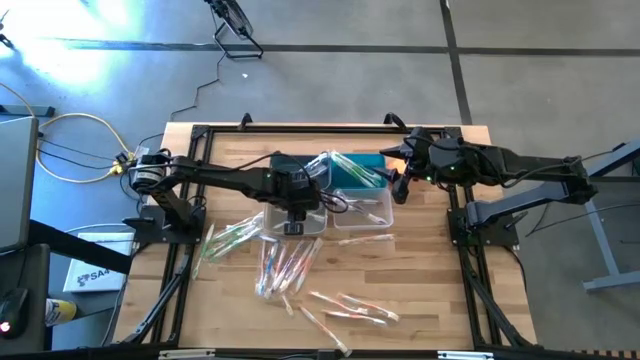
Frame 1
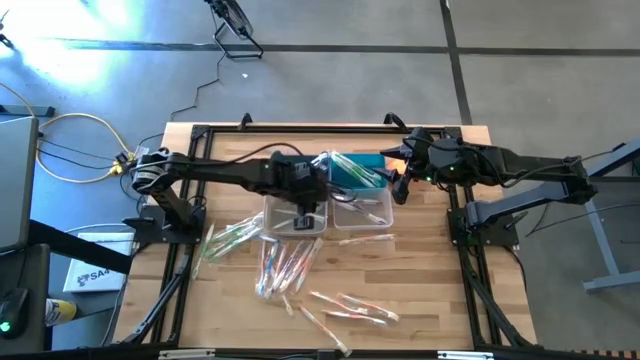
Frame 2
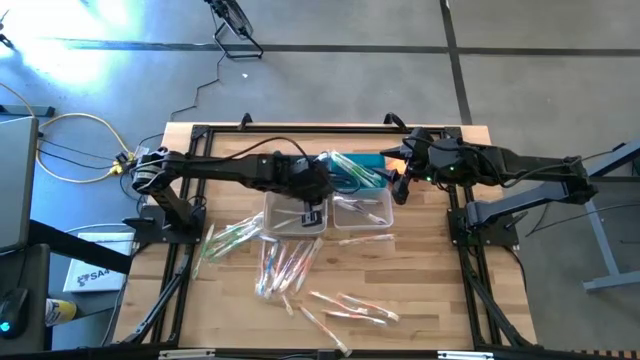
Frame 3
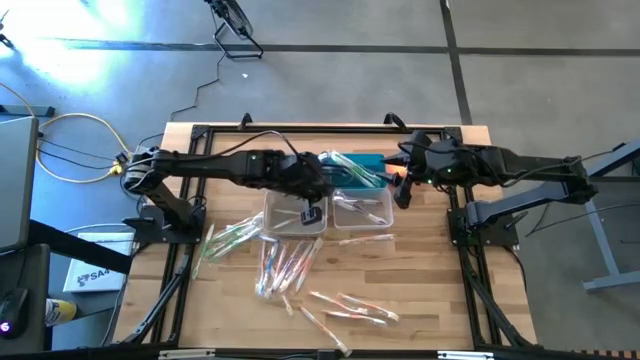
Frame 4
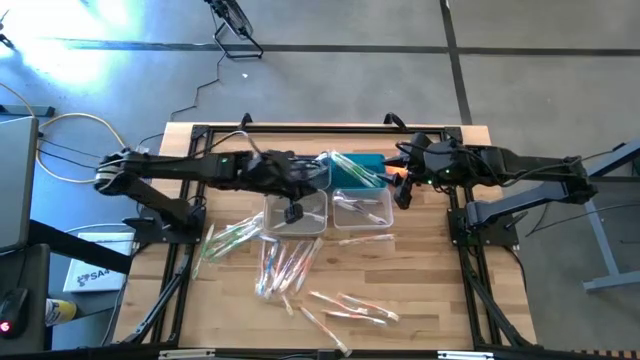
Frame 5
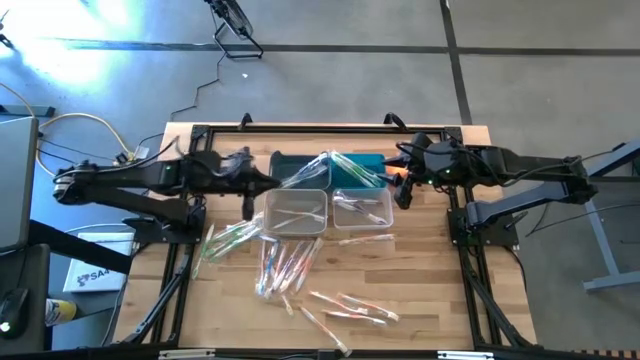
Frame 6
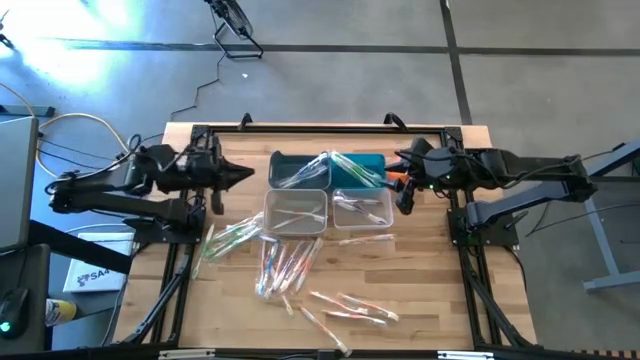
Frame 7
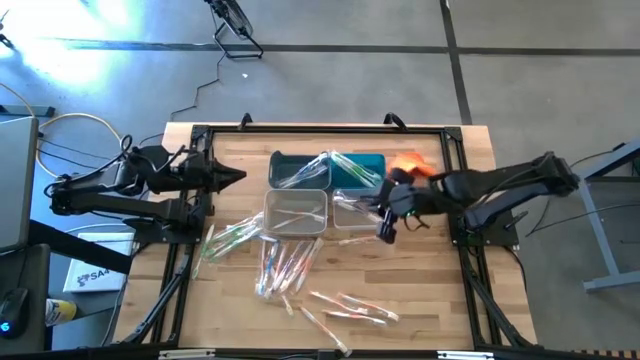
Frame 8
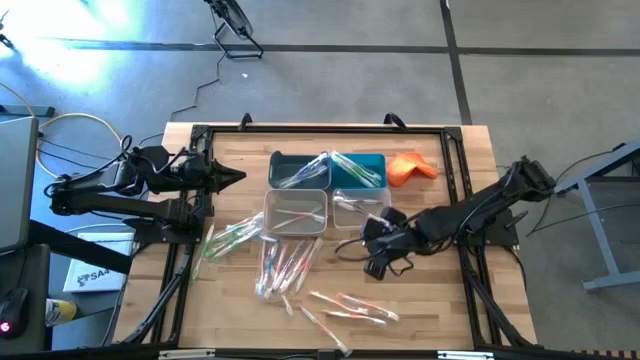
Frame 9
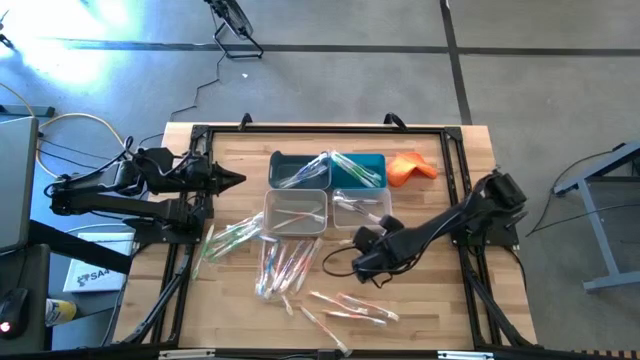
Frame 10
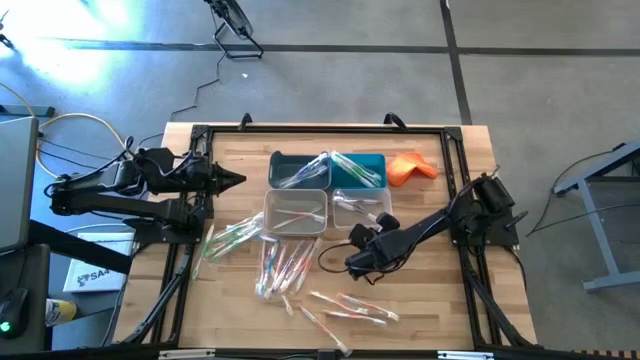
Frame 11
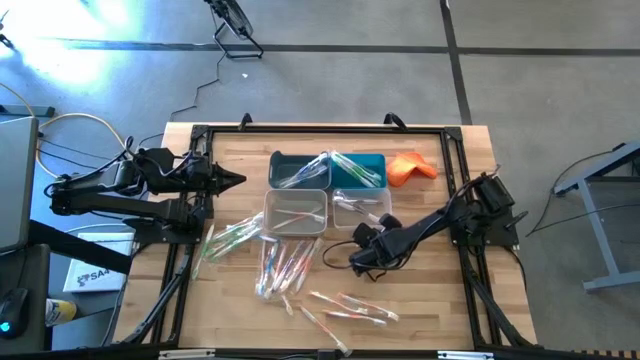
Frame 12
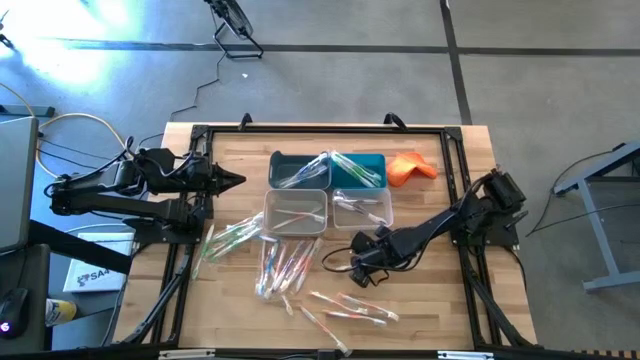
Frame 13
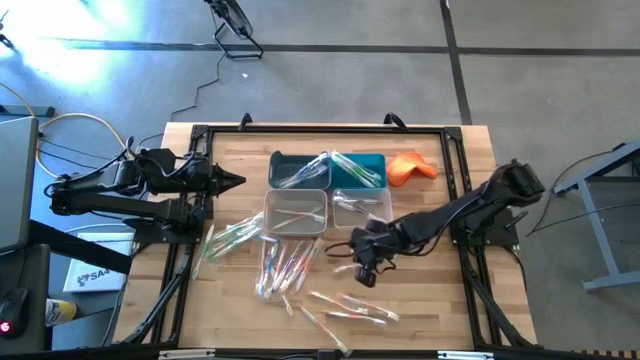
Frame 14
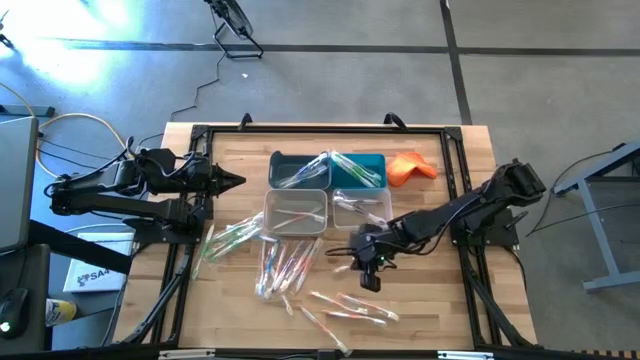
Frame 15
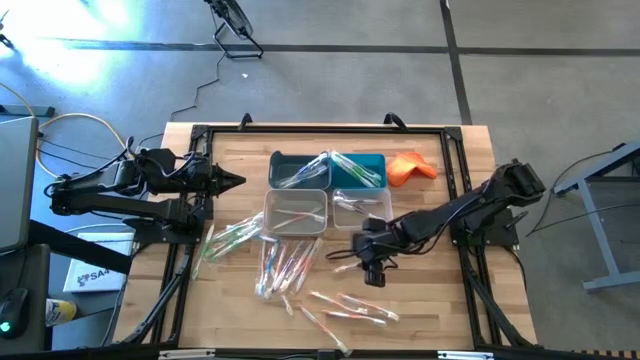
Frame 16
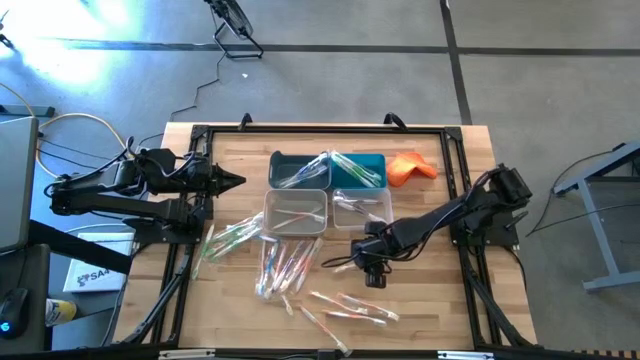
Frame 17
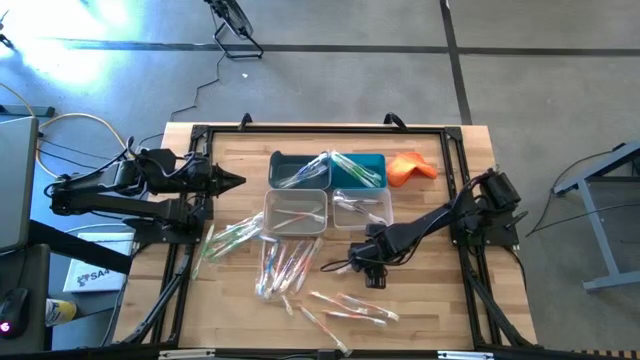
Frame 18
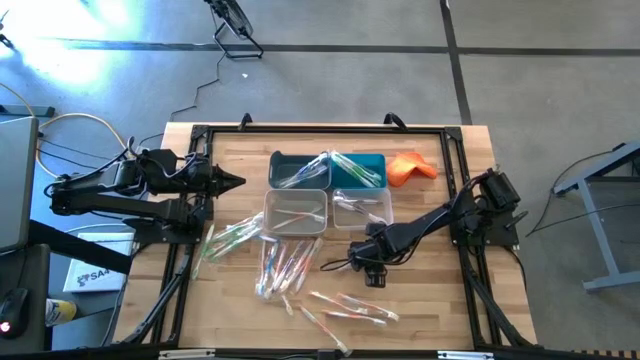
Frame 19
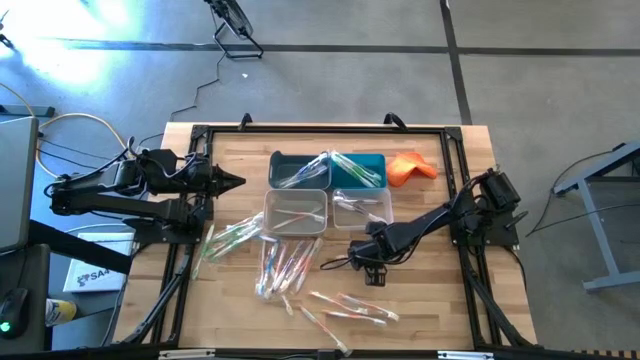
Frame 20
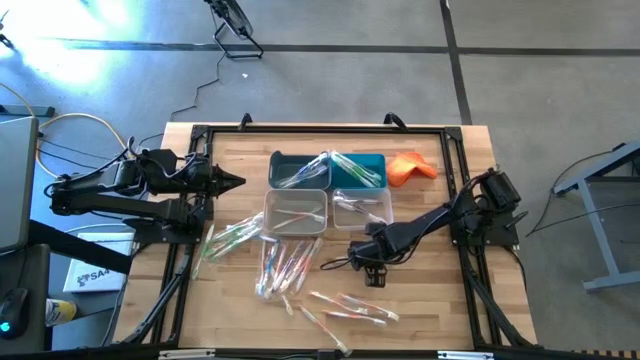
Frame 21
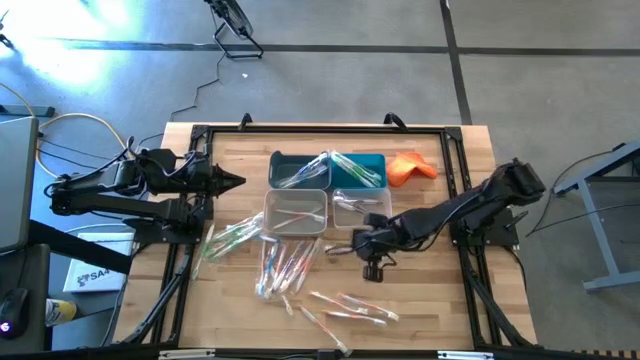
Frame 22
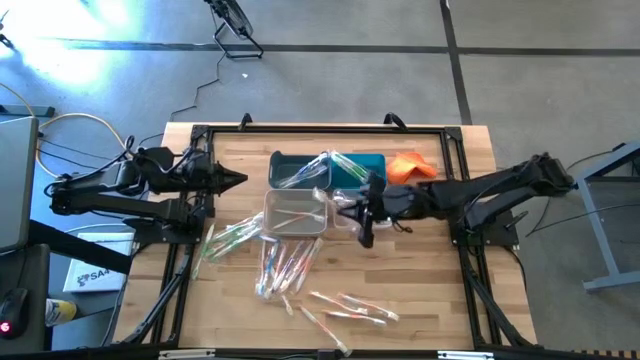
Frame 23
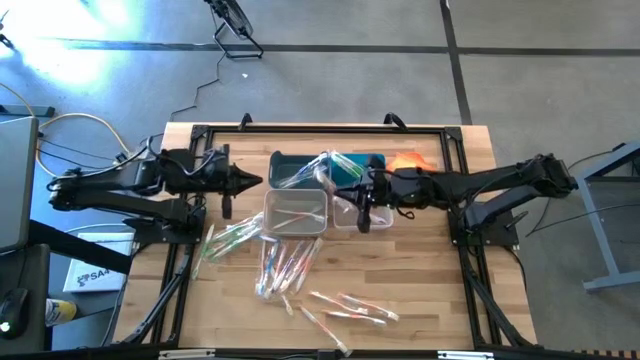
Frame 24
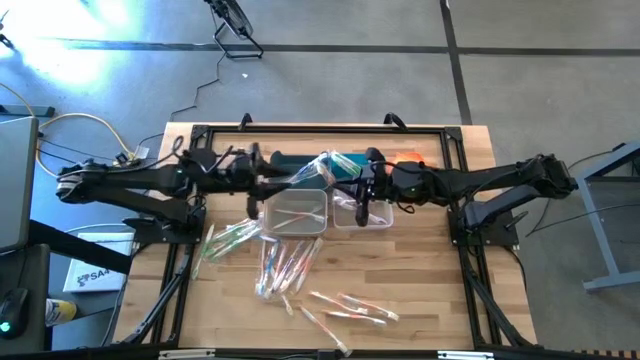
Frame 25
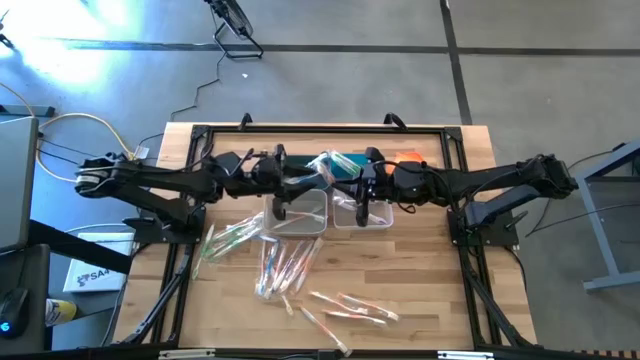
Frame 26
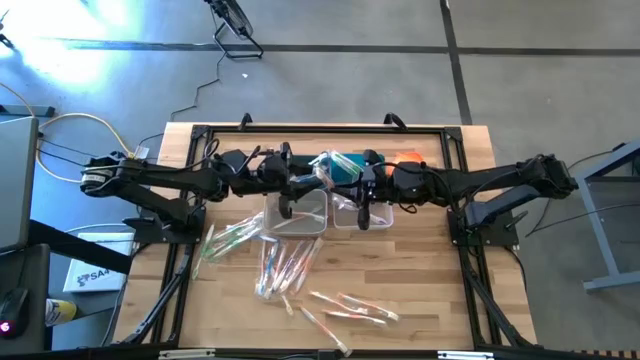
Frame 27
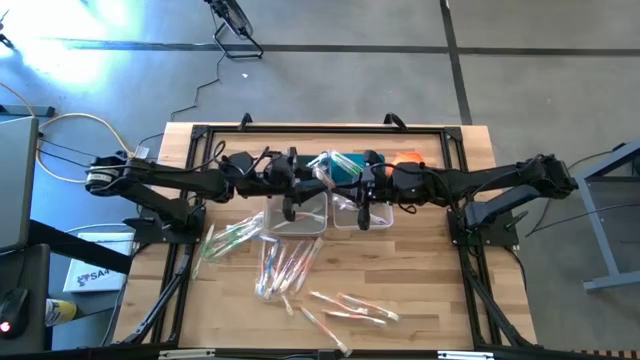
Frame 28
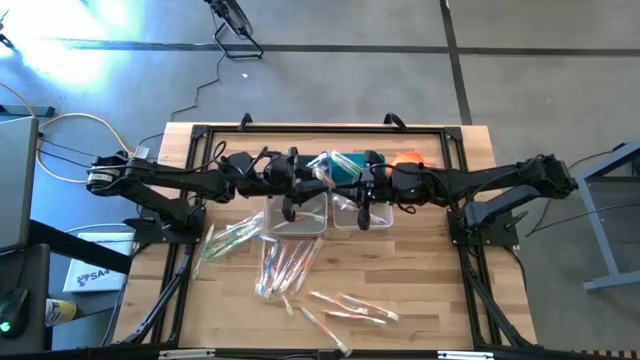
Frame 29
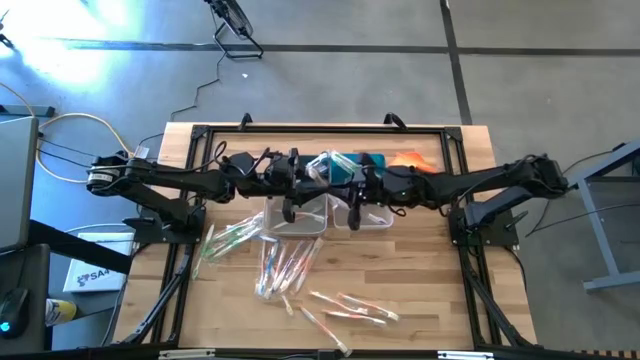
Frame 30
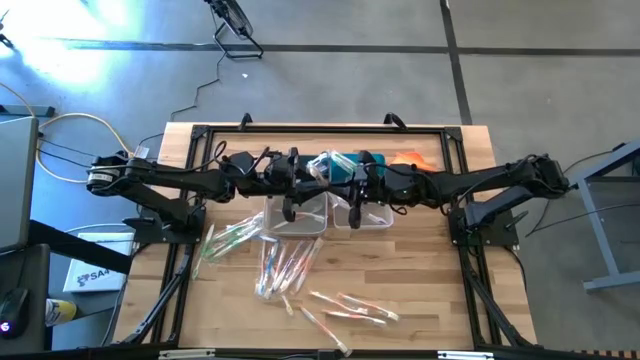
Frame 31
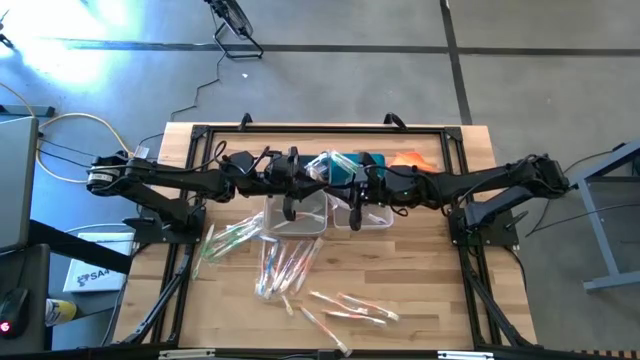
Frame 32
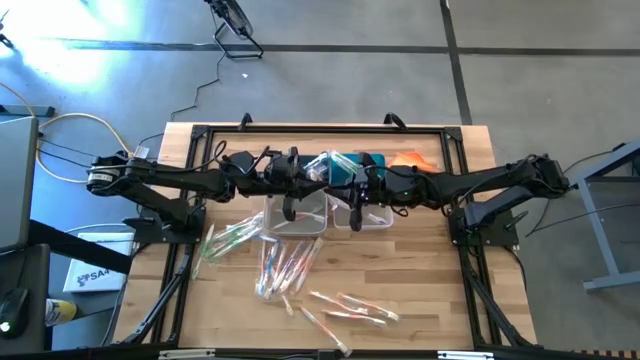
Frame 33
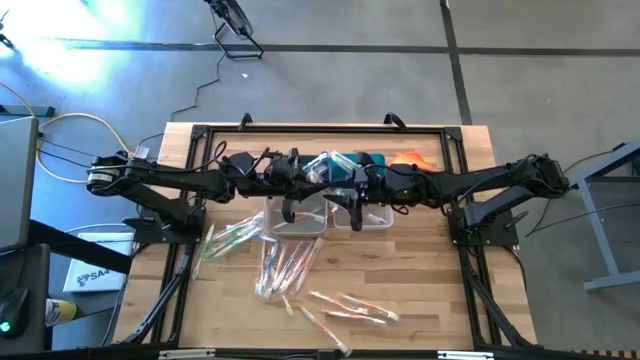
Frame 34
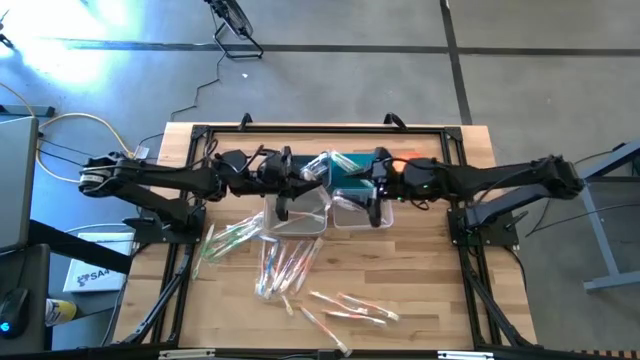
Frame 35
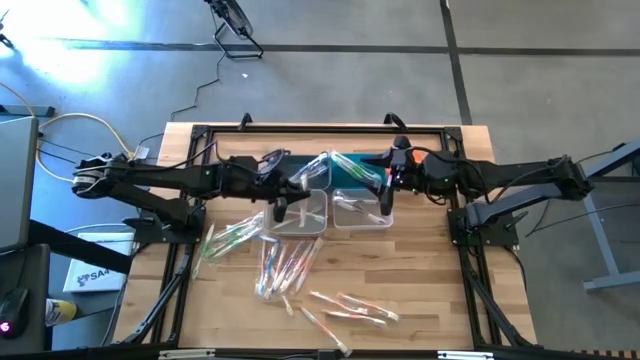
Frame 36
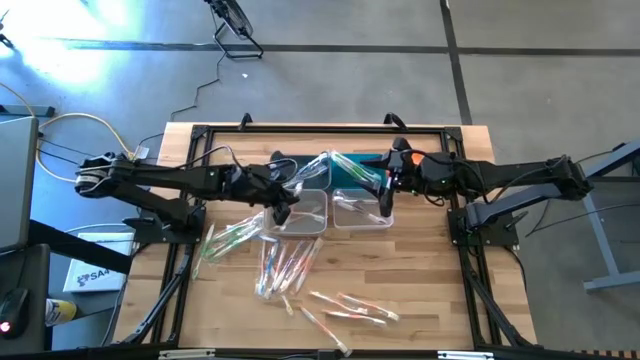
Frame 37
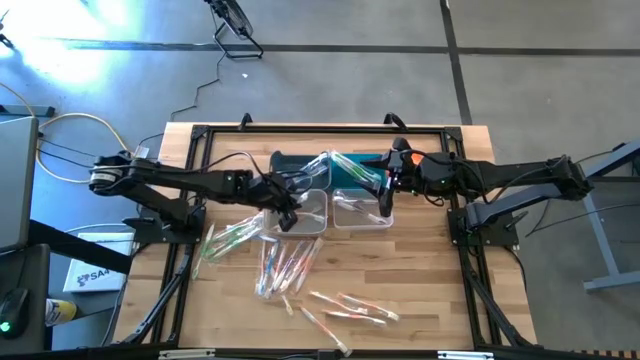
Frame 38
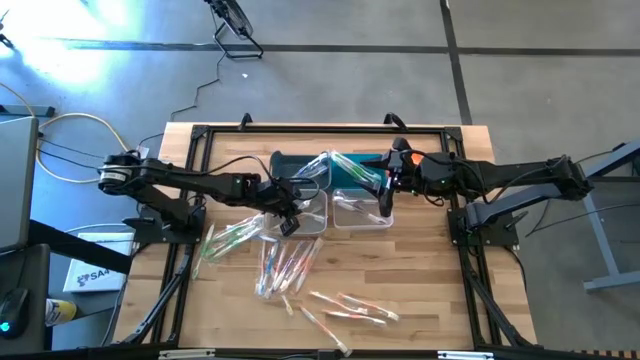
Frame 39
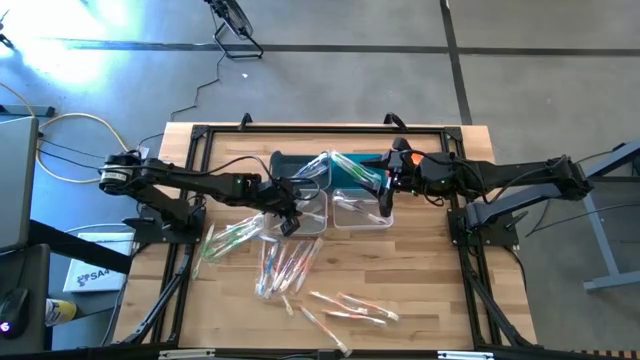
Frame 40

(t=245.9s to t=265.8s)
Task: Pick & Place Toothbrushes
Put the orange toothbrush into the gray bin

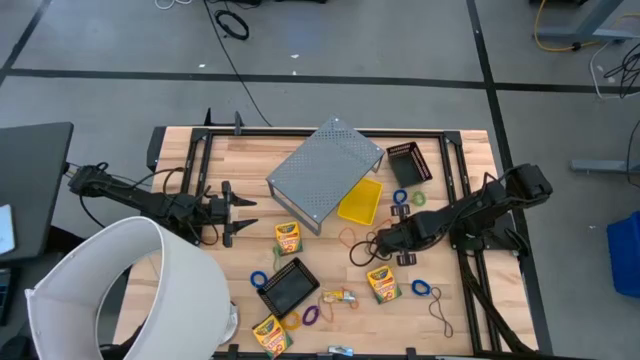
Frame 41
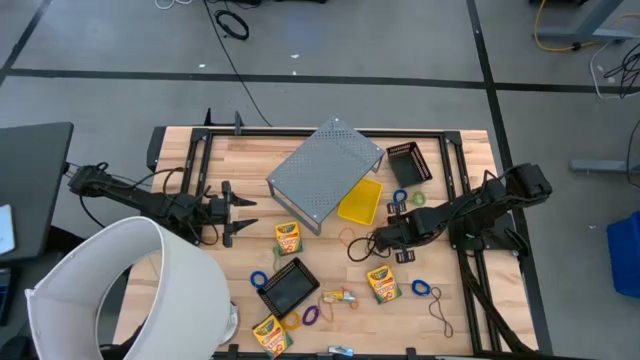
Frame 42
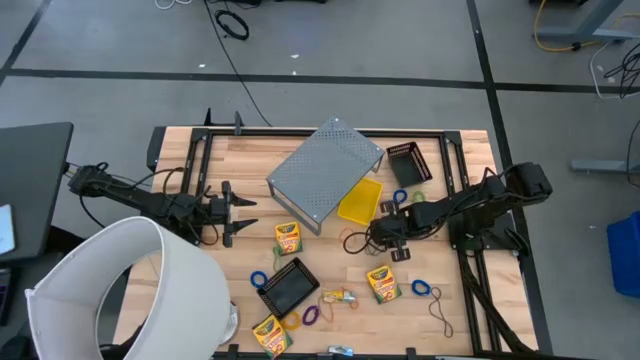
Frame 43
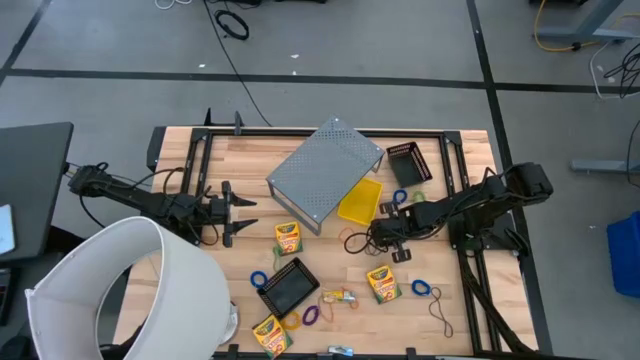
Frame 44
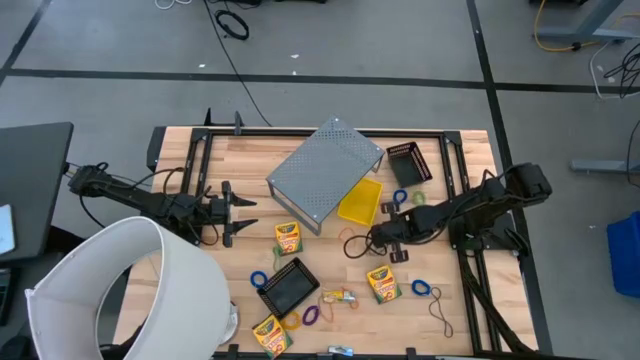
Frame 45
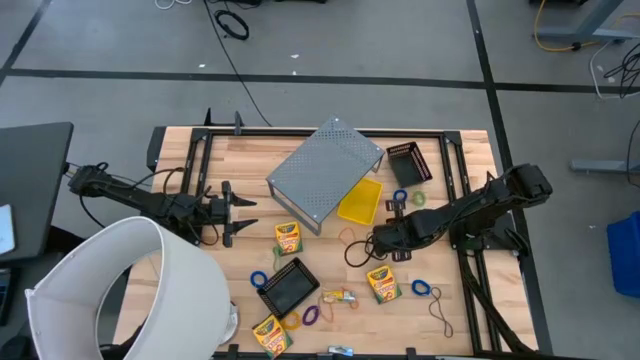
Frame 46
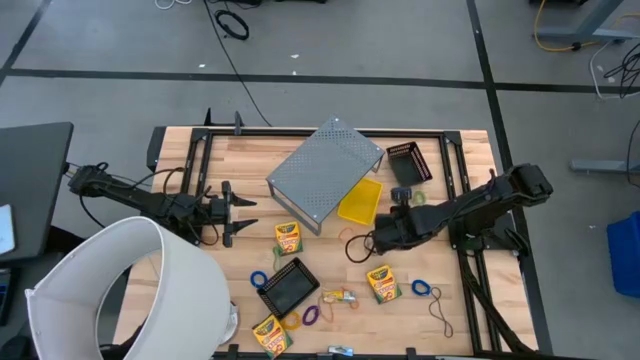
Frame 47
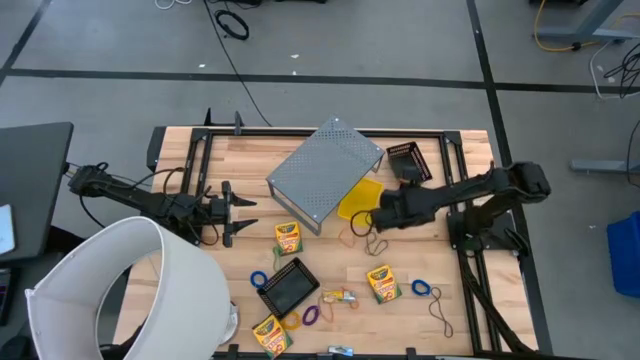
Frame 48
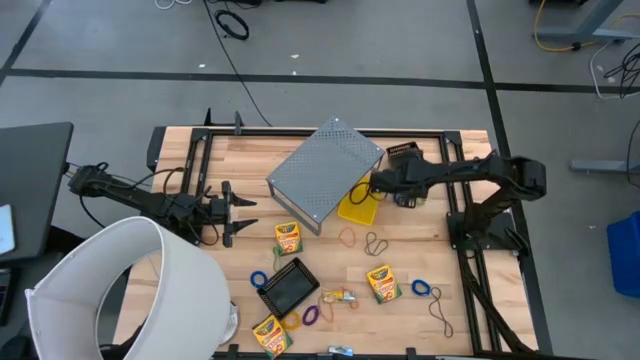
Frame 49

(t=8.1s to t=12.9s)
Task: Pick & Place Office Desk Supplies
Put the orange rubber band into the top black bin
